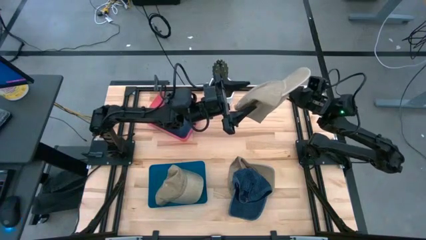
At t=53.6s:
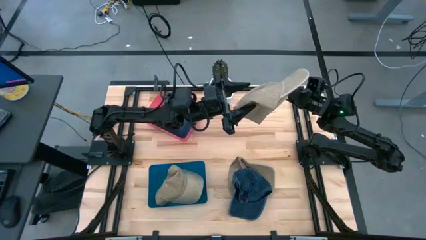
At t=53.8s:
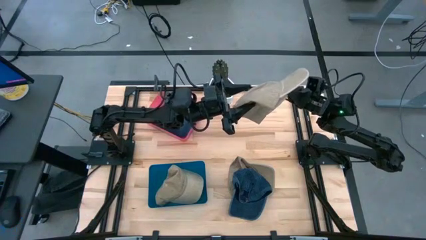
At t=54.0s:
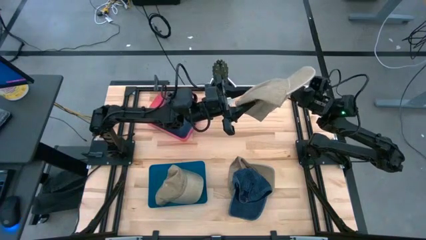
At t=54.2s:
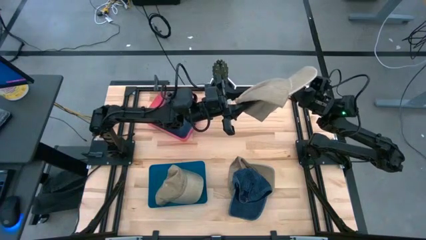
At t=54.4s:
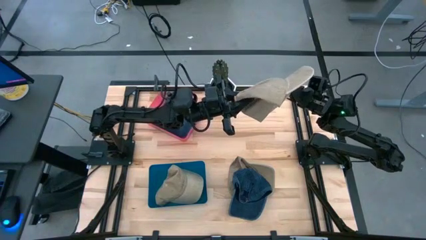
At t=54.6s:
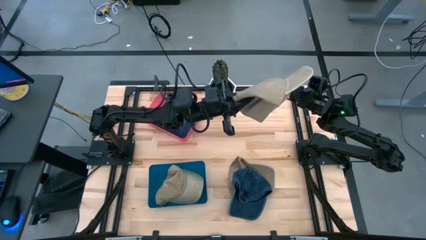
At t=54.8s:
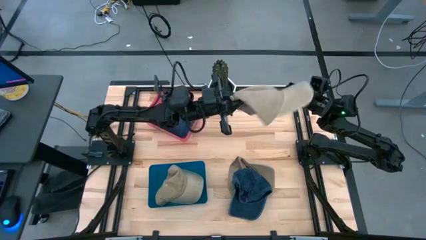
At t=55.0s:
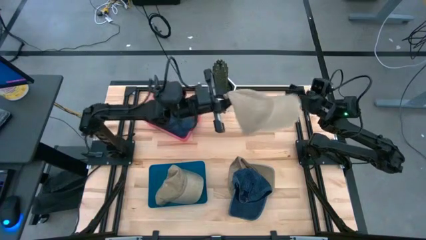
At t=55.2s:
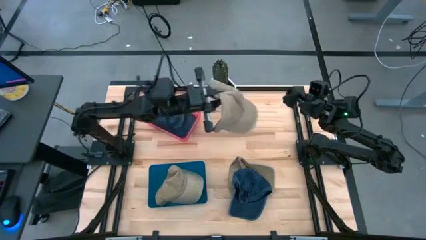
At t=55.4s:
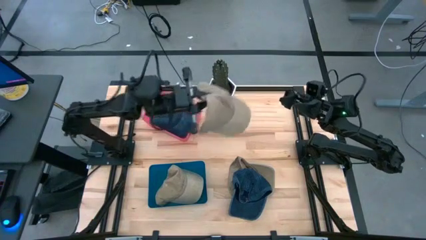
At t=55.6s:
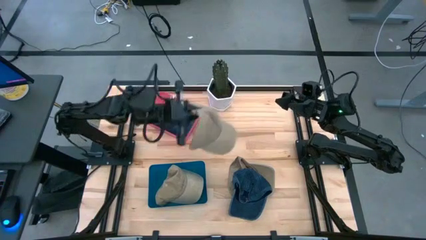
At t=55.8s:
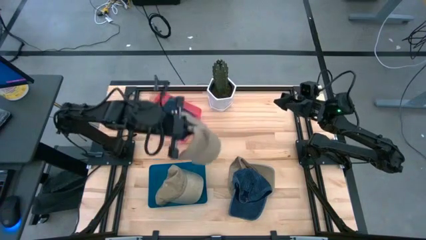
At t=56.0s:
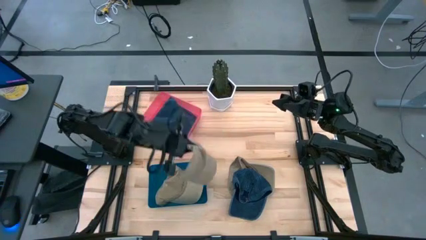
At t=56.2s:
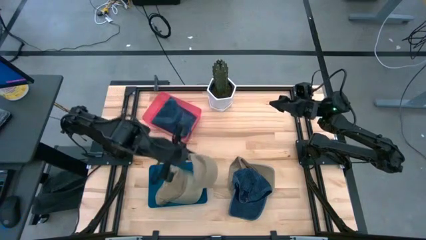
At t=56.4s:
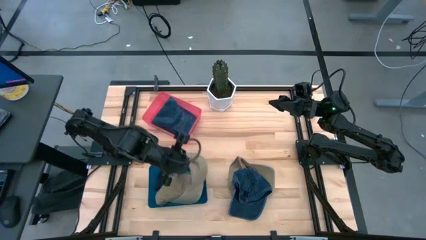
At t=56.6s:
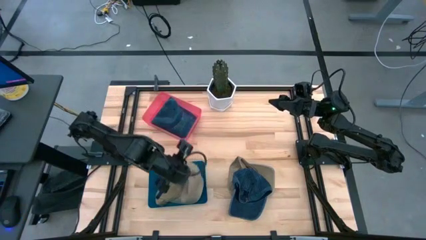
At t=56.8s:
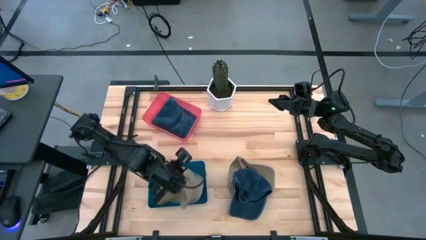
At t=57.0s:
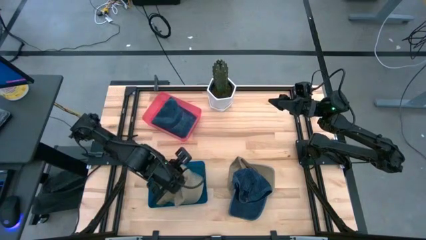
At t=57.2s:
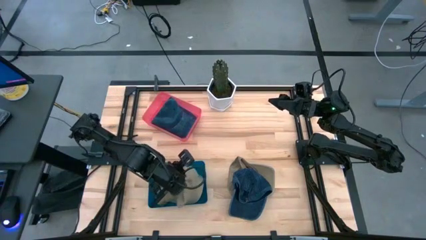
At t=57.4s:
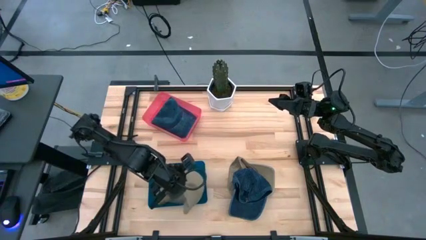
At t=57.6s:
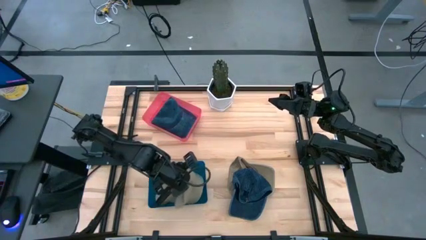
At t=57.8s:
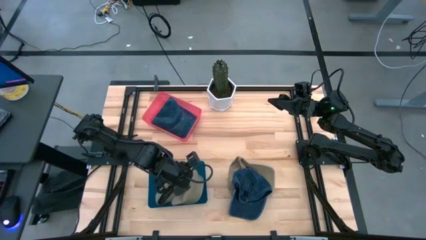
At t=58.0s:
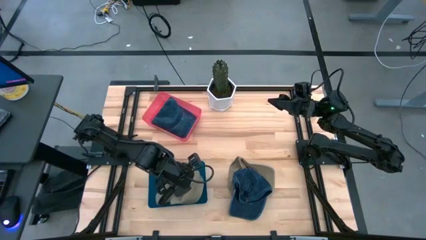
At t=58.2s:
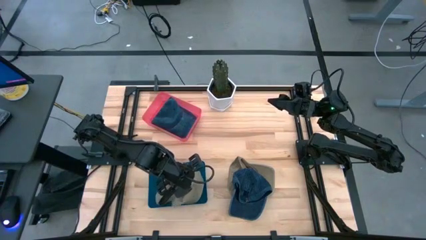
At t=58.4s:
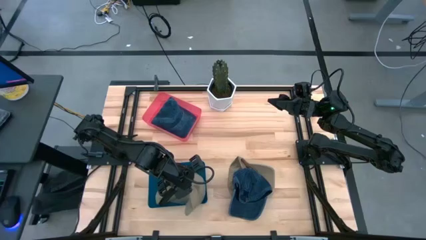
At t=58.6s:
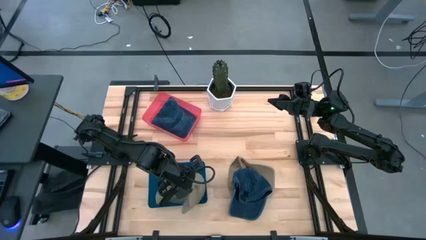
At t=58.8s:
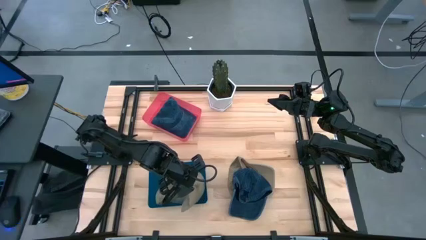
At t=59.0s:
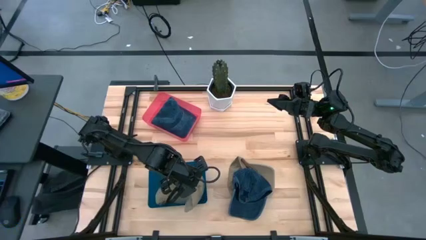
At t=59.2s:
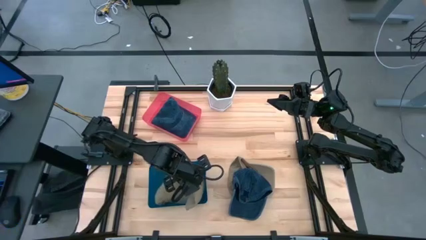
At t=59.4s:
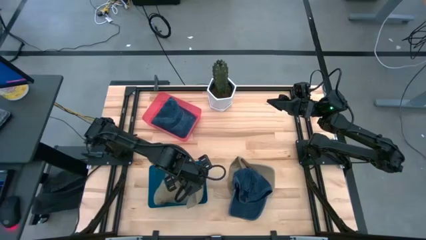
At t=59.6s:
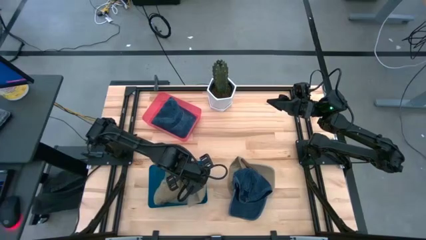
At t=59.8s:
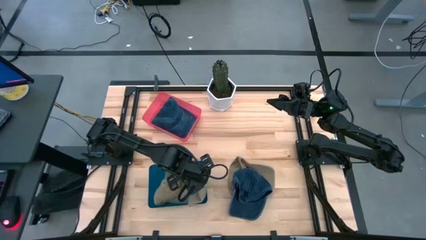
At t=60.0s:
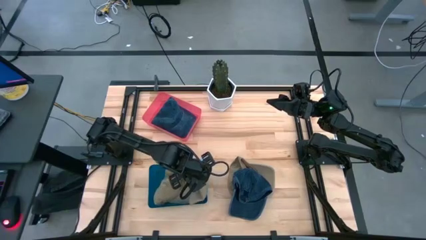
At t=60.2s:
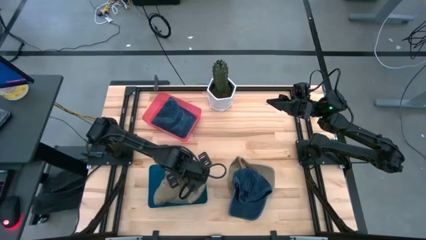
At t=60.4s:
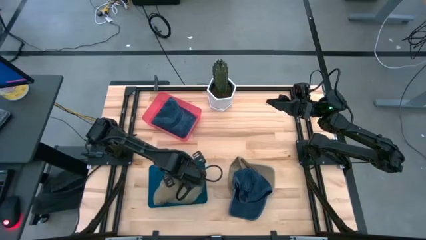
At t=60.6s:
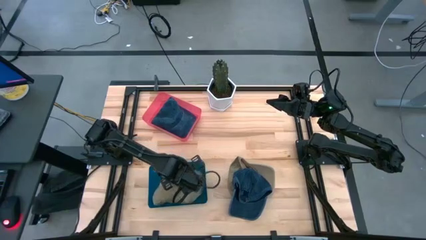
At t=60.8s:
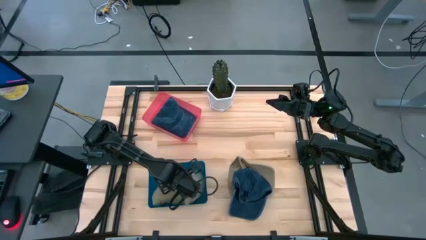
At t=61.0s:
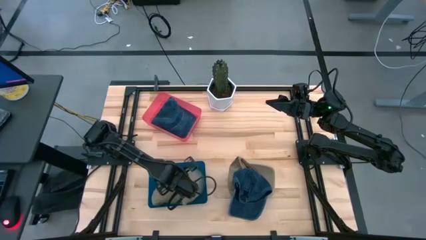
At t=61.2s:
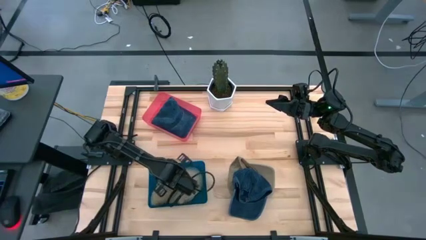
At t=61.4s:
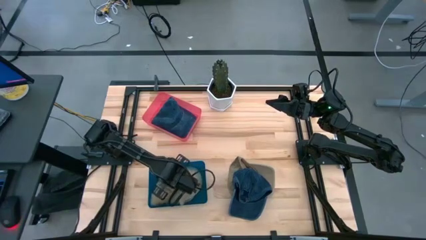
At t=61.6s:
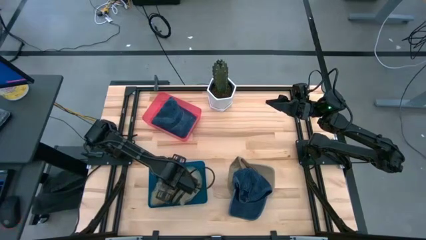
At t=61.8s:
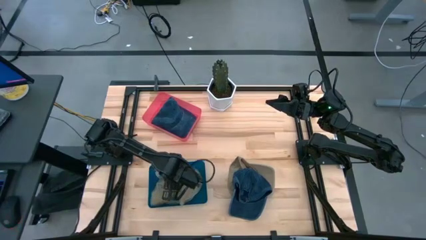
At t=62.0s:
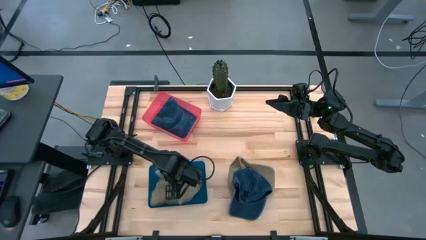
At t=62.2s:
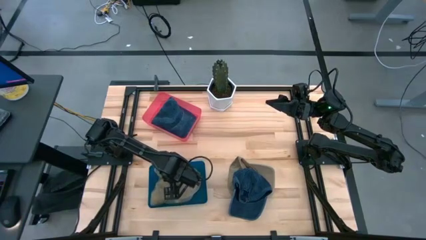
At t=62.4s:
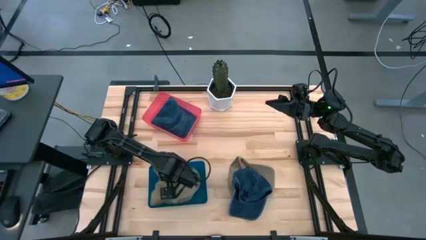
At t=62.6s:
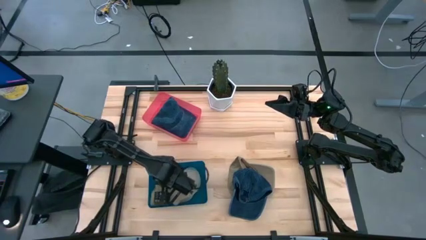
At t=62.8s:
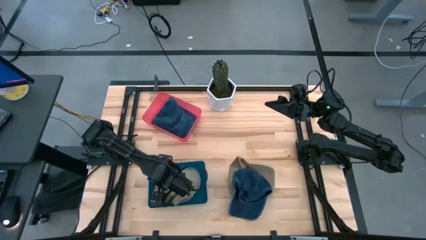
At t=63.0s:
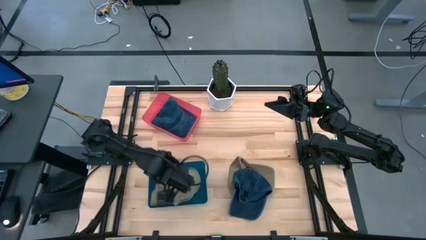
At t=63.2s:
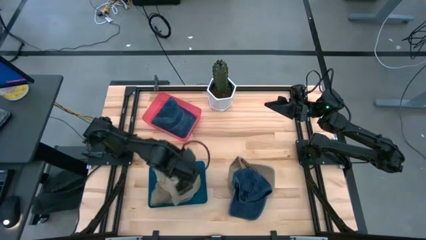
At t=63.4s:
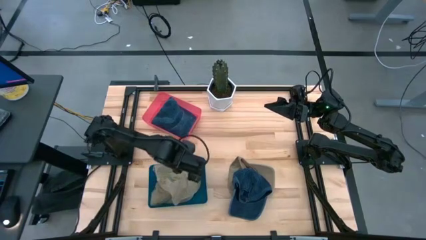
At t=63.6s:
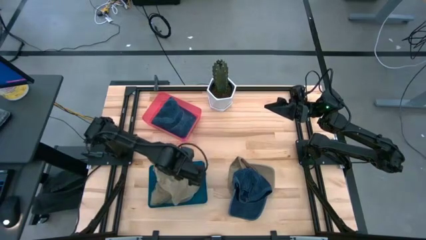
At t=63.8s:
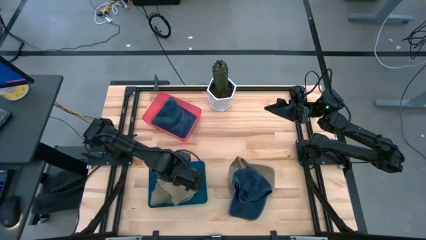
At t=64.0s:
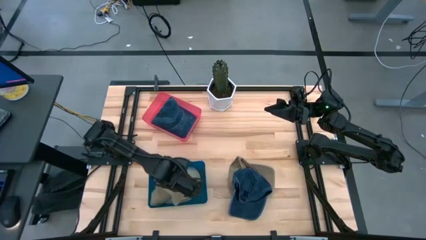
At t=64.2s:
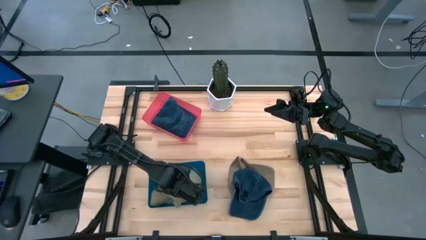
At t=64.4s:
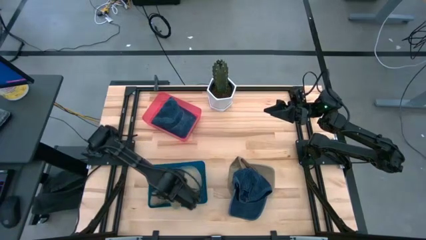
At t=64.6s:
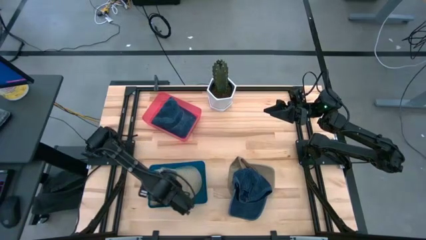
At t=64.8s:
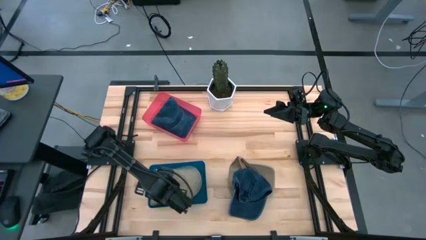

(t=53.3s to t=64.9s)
Task: Pick & Place hat
Put the top brown cap into the blue bin
